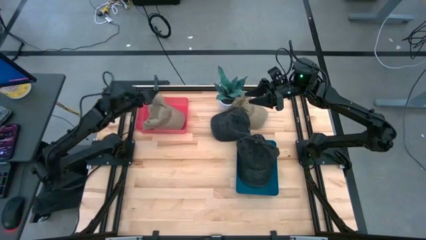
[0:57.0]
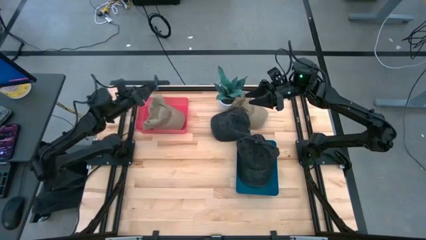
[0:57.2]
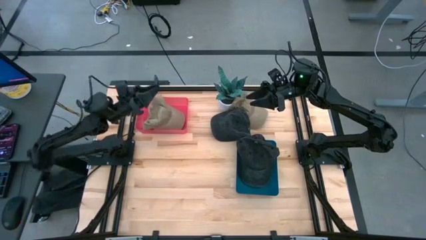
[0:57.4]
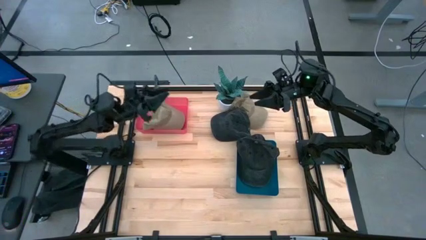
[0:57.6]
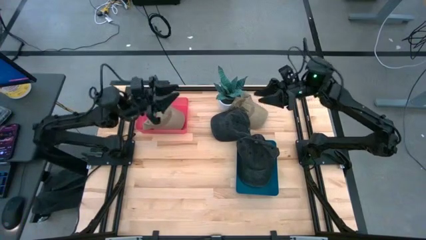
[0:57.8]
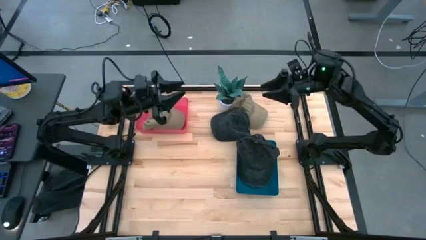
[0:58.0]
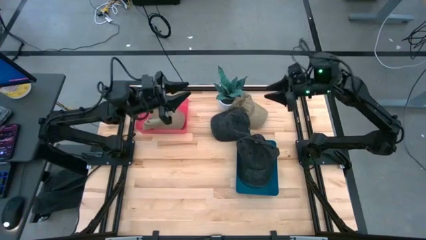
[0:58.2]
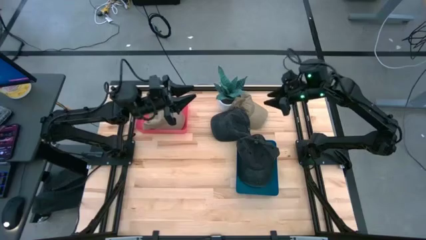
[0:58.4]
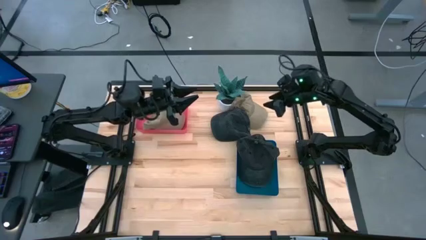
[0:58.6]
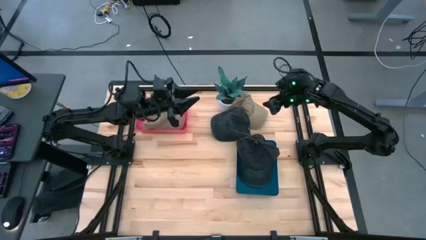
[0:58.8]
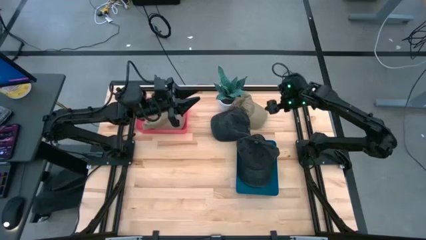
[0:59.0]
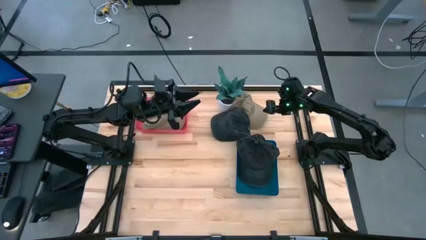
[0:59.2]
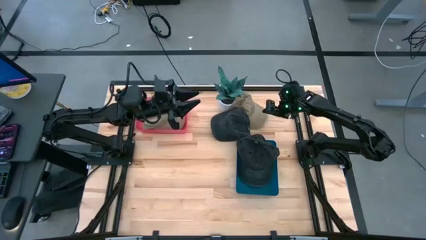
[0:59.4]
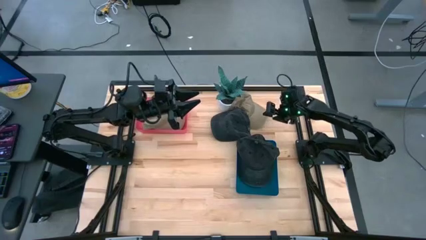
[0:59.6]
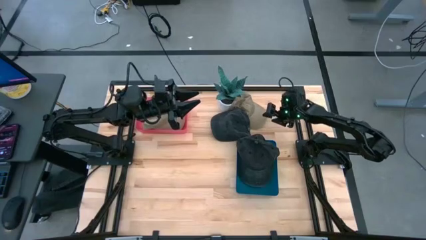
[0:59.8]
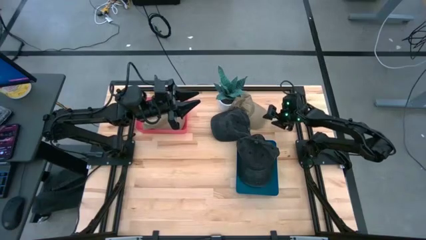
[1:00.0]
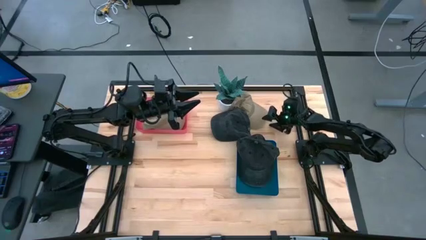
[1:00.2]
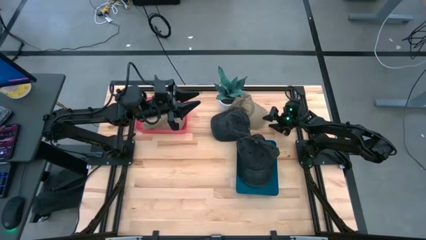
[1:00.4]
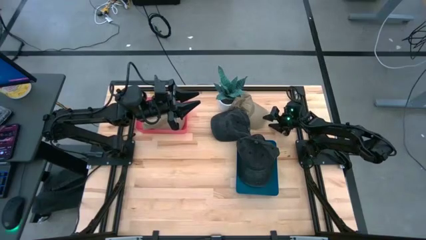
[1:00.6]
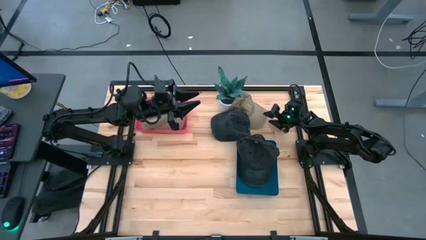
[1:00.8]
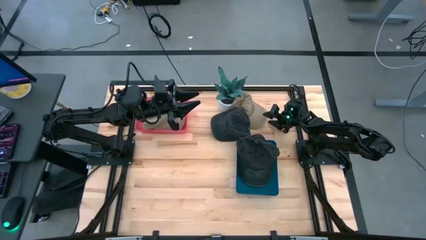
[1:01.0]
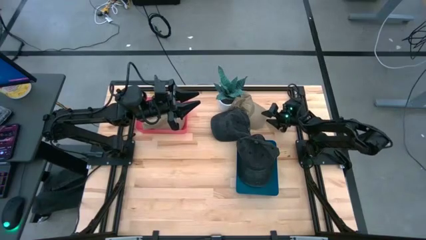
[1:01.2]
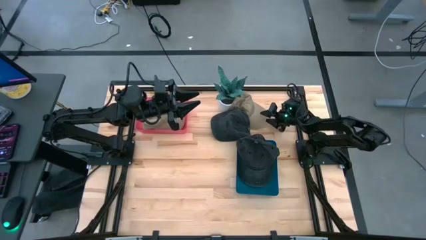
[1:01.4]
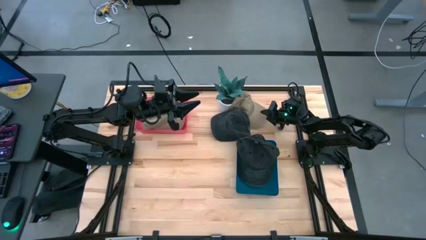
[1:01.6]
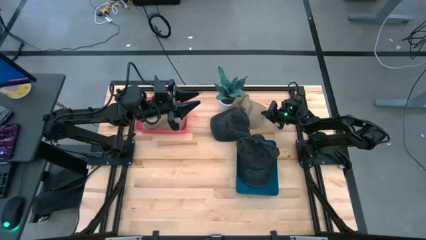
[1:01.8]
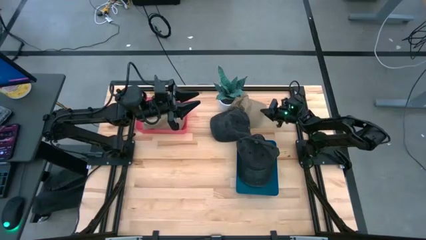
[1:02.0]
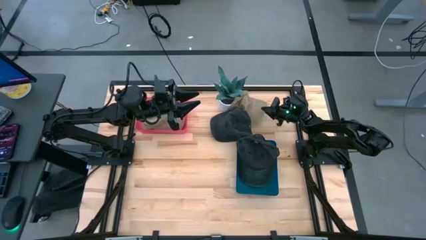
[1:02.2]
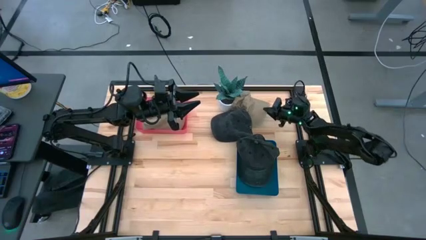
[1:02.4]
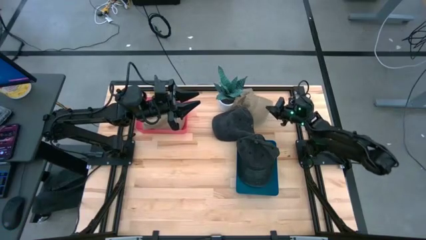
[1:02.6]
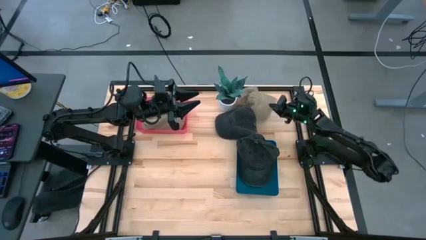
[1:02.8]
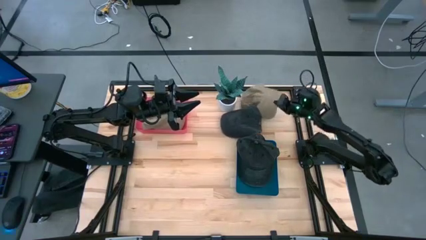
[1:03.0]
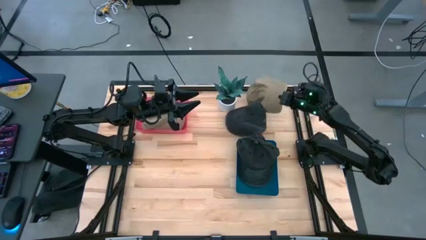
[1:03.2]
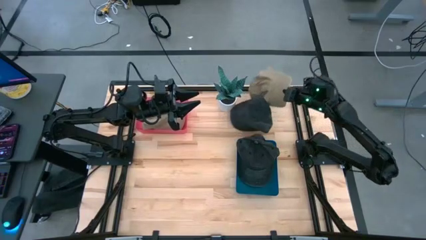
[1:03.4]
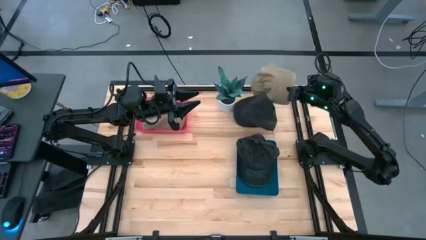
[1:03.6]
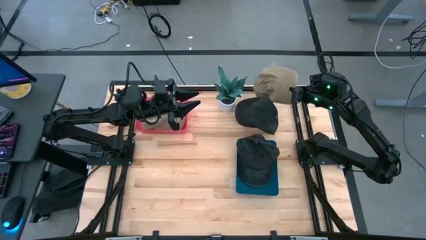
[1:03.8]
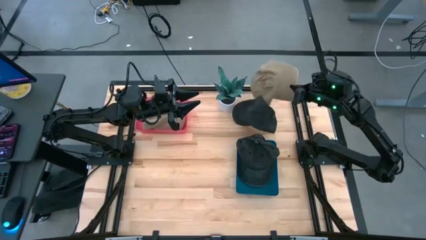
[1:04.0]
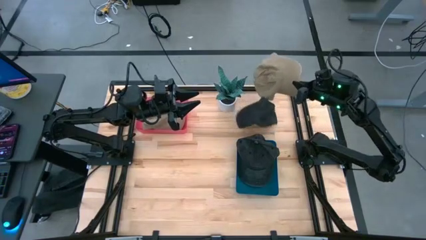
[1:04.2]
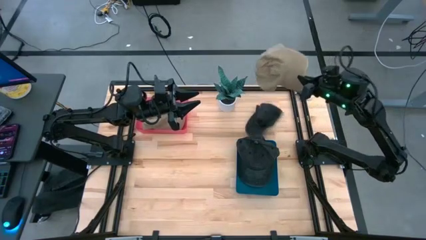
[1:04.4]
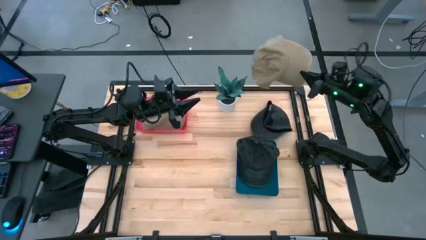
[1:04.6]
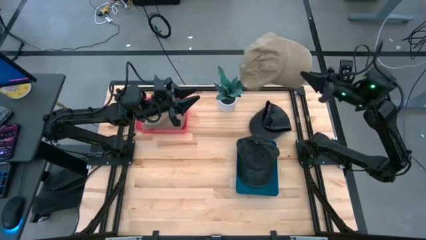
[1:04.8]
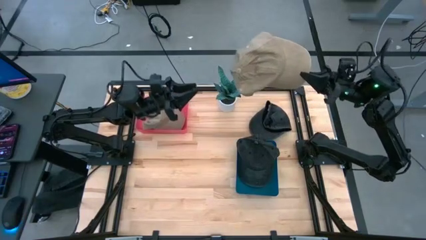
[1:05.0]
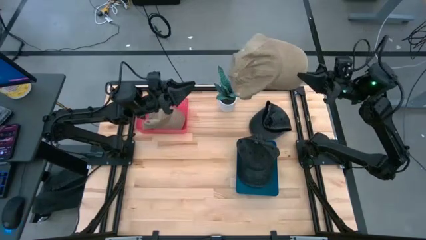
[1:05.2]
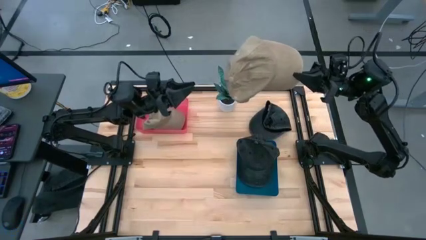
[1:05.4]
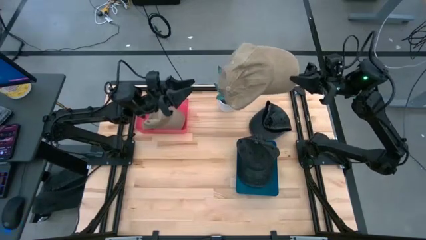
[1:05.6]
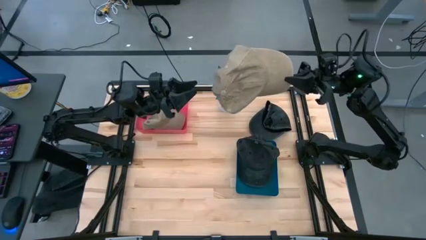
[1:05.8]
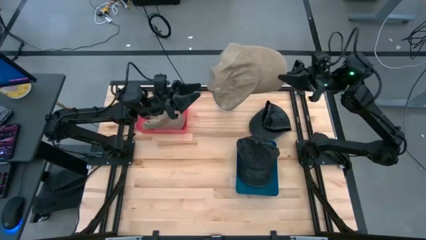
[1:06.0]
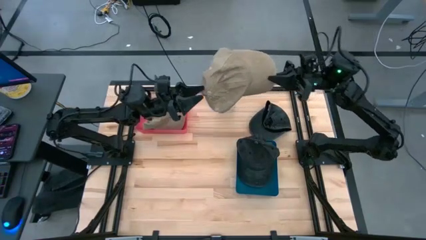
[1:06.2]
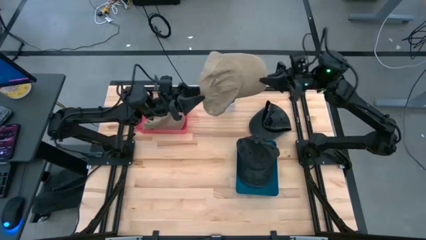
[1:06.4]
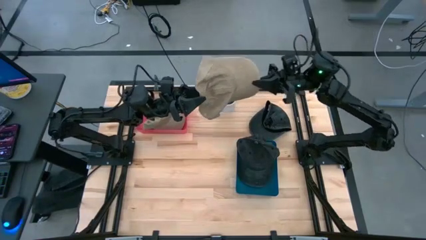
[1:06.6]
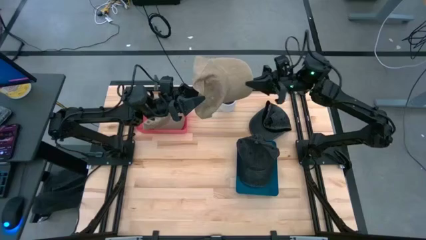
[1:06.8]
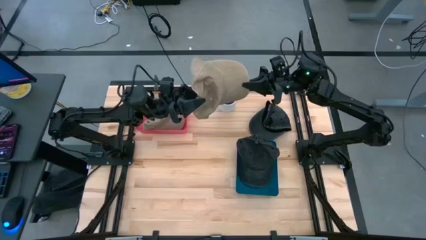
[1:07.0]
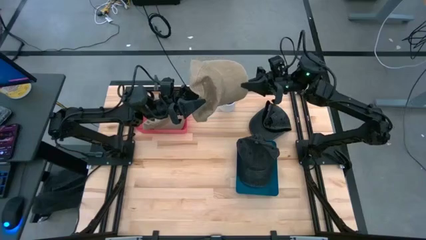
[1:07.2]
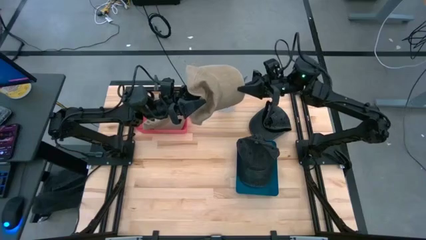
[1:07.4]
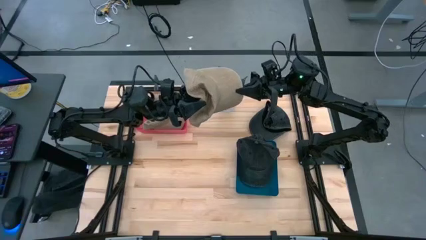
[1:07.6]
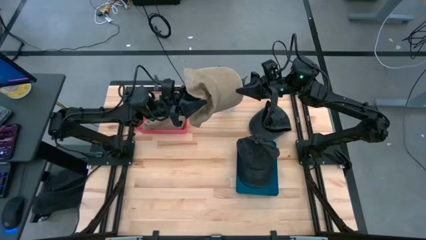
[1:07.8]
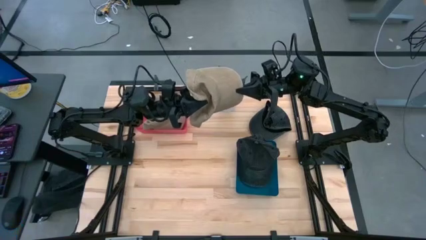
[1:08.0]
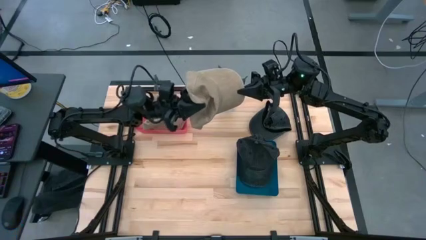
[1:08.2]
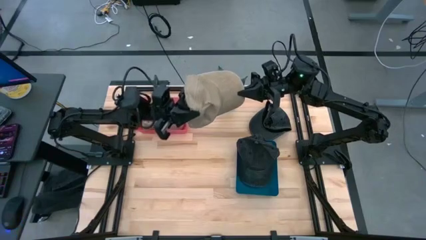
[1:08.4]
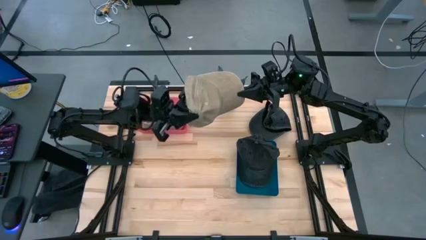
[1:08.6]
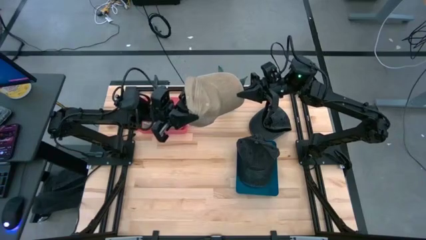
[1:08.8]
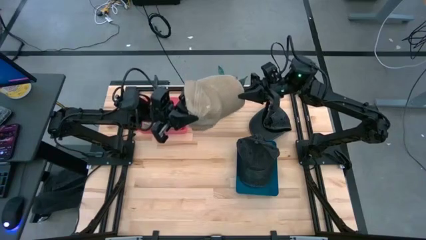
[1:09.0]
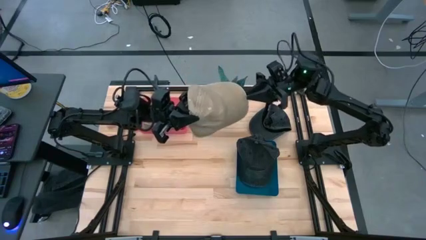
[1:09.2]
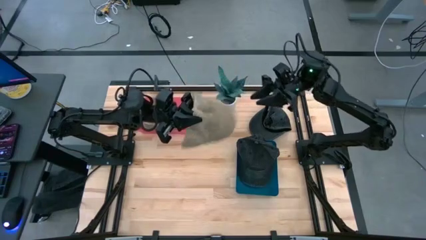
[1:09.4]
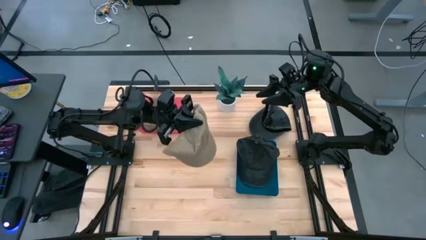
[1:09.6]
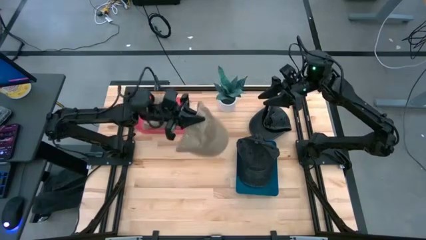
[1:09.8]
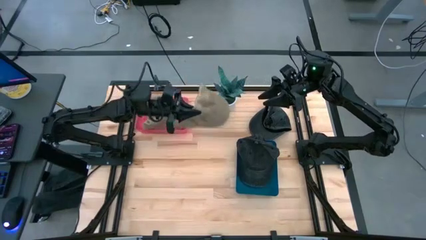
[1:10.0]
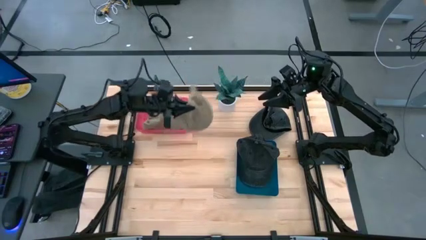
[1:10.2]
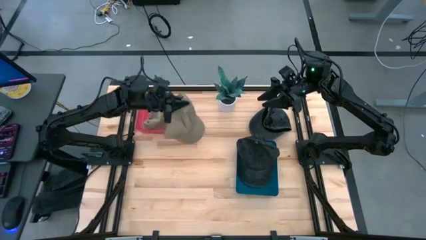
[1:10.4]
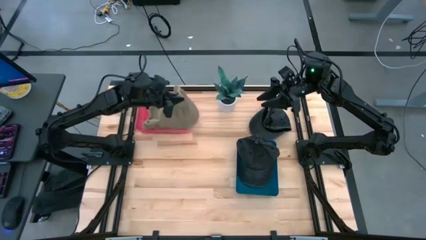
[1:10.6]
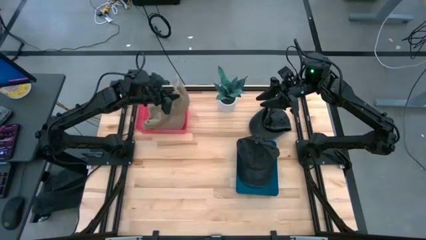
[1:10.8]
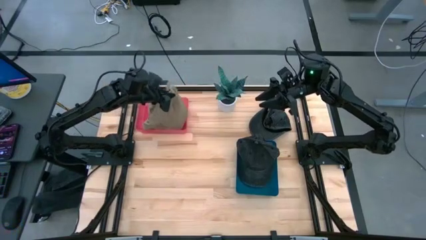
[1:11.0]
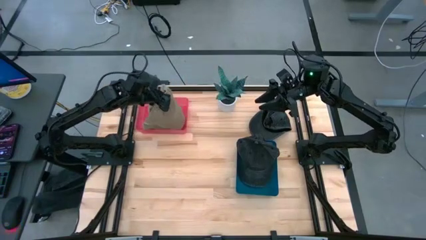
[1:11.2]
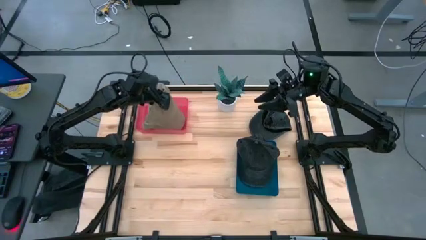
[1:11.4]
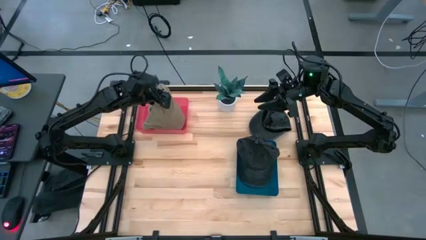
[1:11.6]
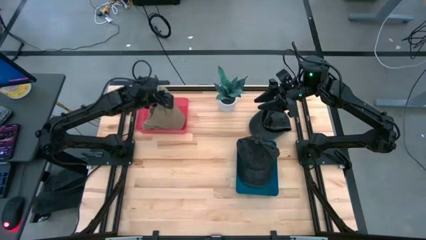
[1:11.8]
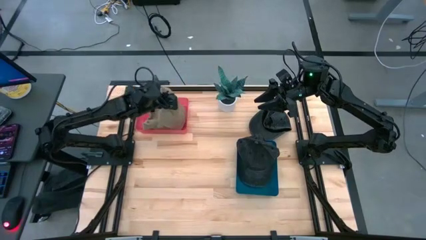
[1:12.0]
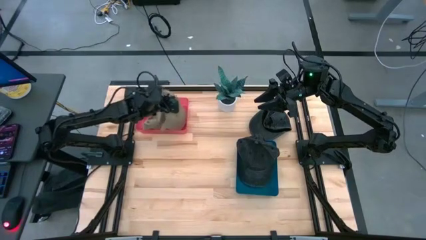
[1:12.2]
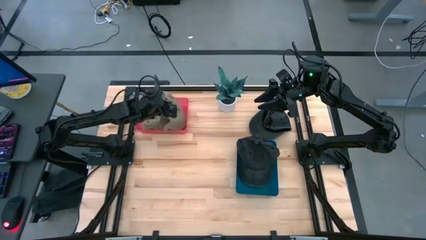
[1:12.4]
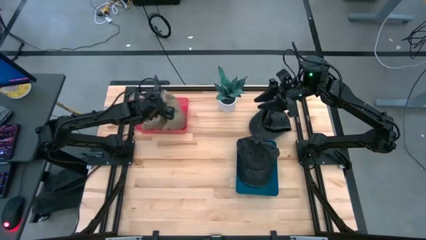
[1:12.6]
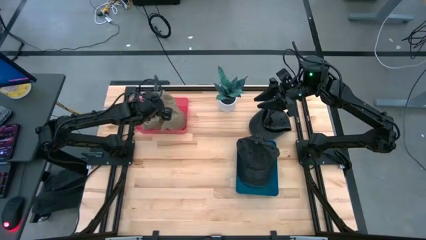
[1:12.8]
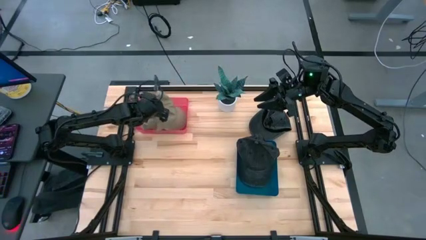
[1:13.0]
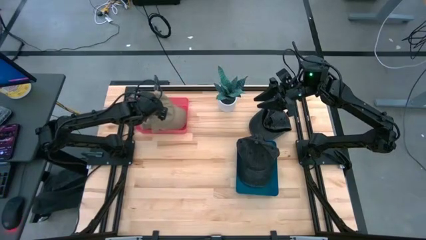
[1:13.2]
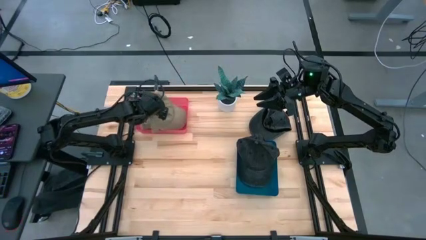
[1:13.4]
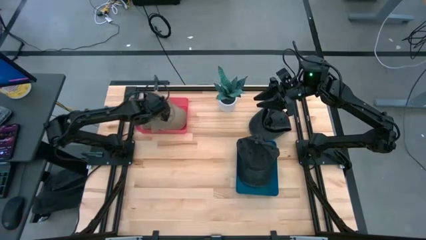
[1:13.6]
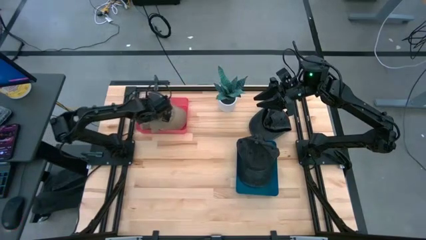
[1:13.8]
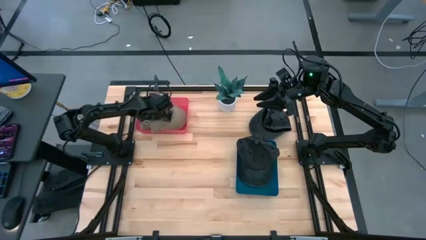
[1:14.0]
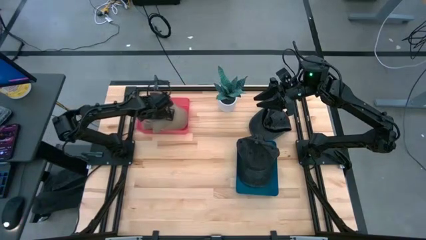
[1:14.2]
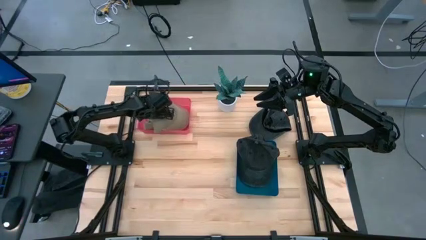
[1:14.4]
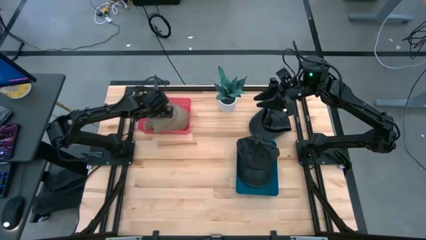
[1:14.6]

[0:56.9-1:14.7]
Task: Pick & Place hat
Put the brown cap into the pink bin
